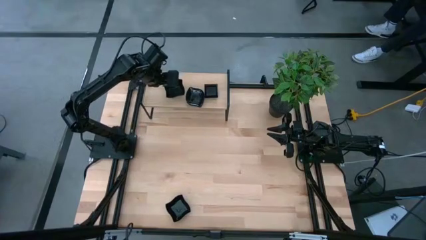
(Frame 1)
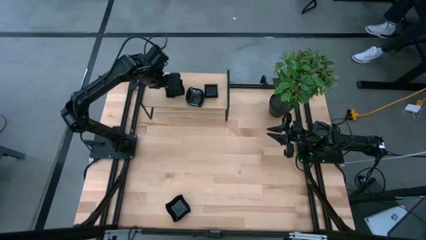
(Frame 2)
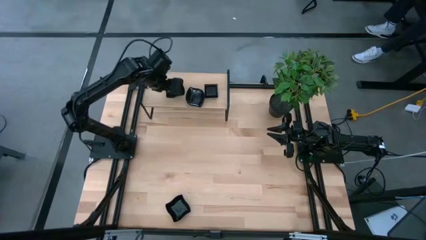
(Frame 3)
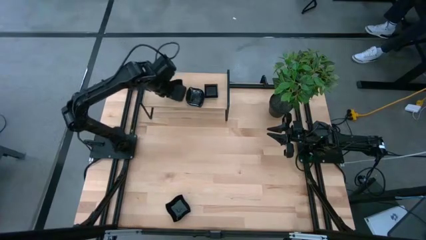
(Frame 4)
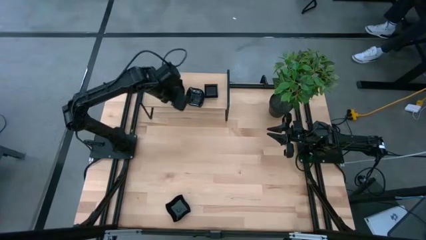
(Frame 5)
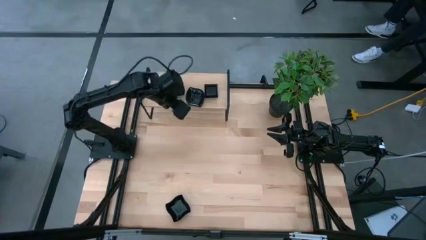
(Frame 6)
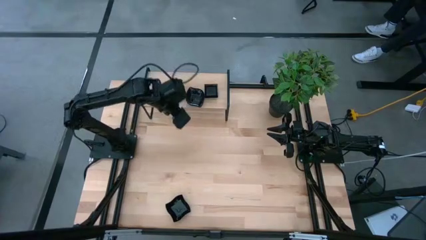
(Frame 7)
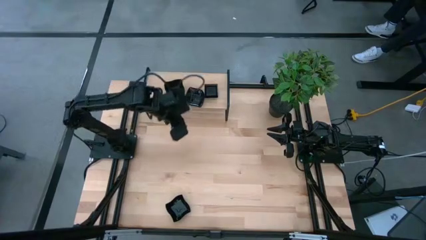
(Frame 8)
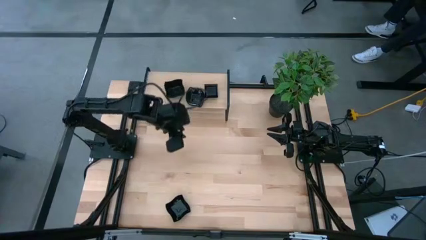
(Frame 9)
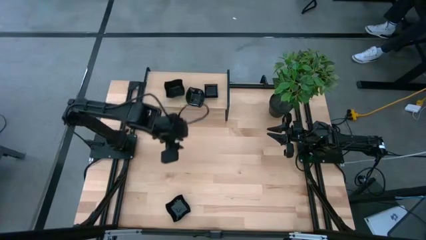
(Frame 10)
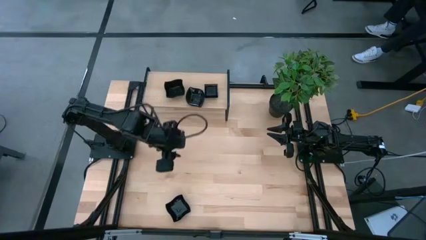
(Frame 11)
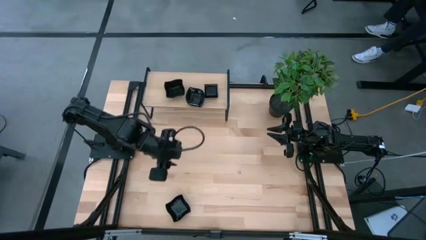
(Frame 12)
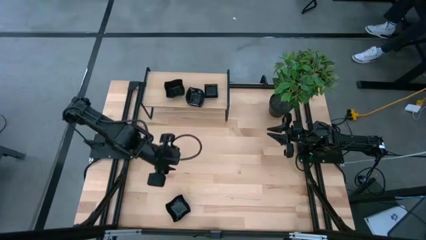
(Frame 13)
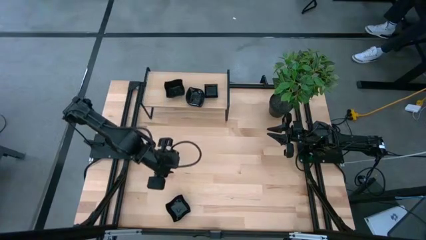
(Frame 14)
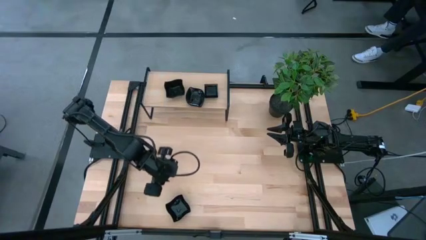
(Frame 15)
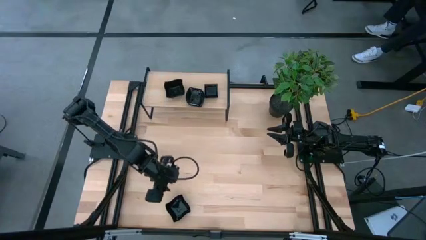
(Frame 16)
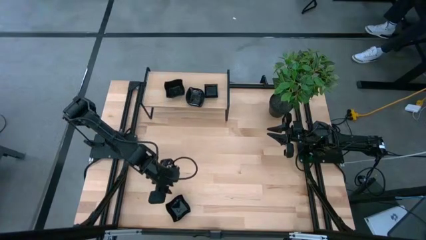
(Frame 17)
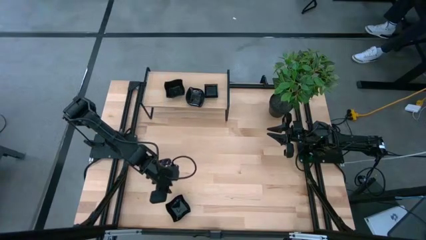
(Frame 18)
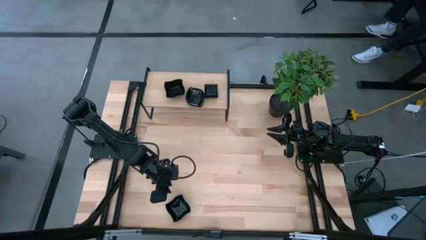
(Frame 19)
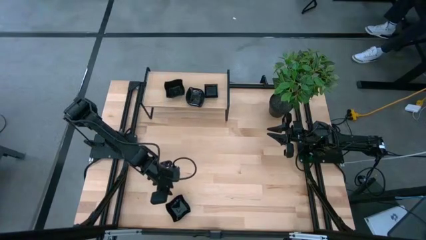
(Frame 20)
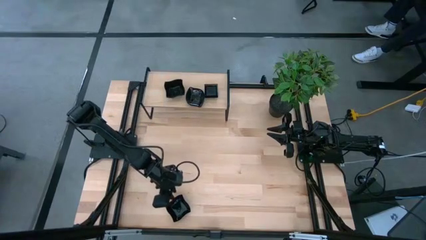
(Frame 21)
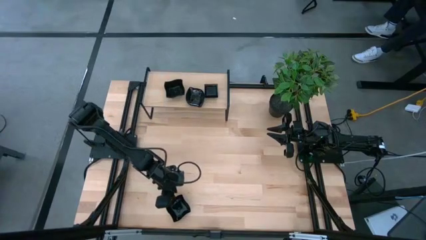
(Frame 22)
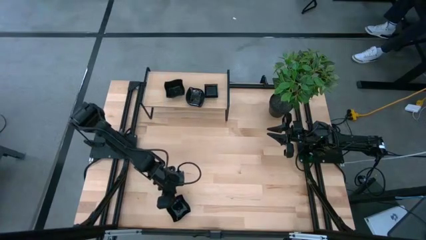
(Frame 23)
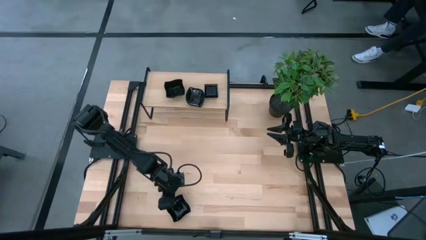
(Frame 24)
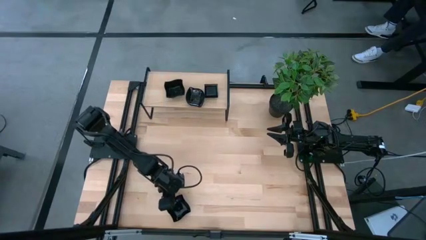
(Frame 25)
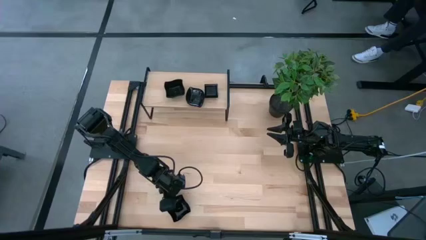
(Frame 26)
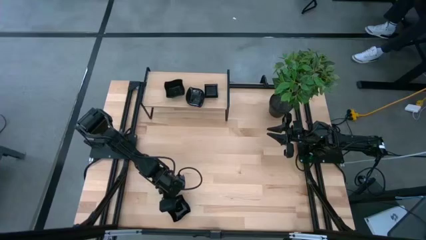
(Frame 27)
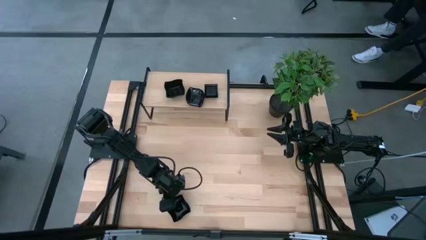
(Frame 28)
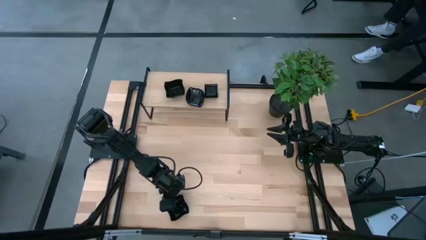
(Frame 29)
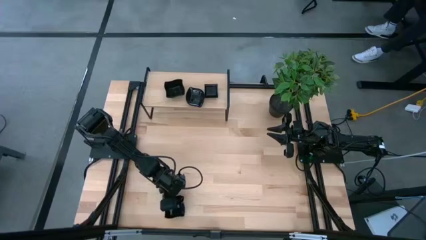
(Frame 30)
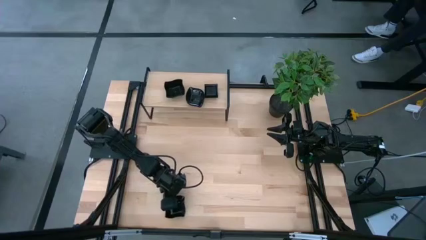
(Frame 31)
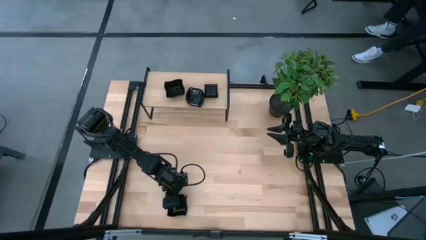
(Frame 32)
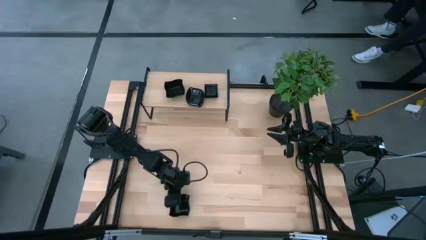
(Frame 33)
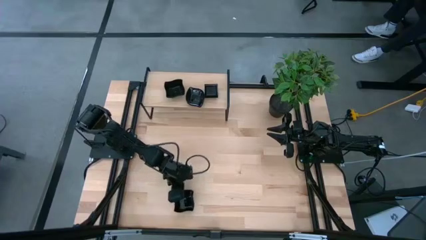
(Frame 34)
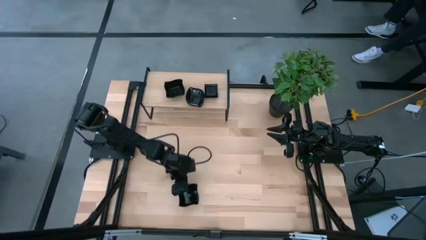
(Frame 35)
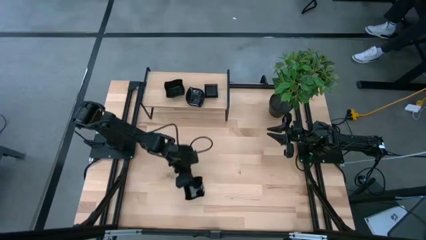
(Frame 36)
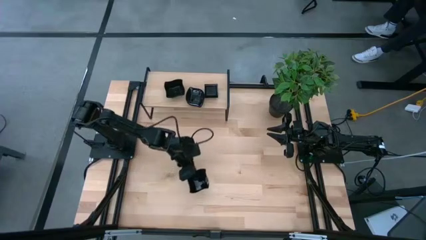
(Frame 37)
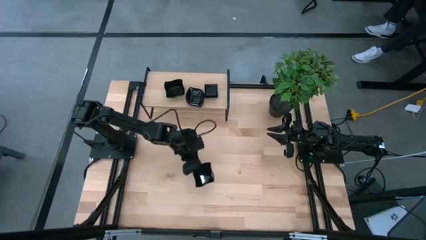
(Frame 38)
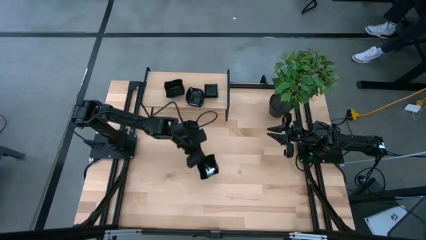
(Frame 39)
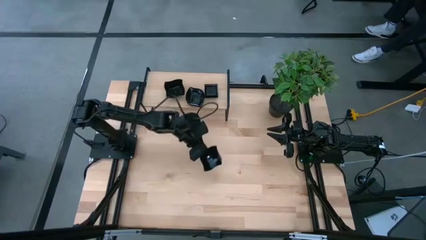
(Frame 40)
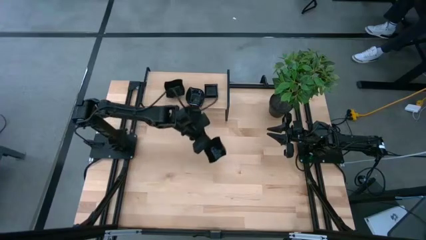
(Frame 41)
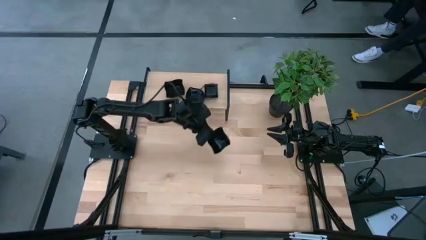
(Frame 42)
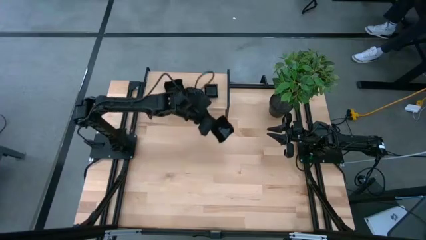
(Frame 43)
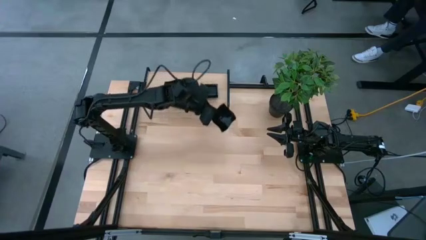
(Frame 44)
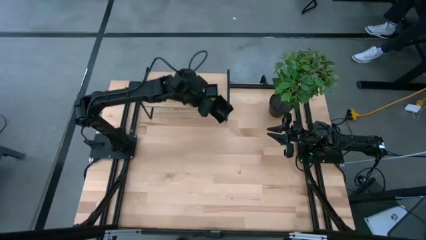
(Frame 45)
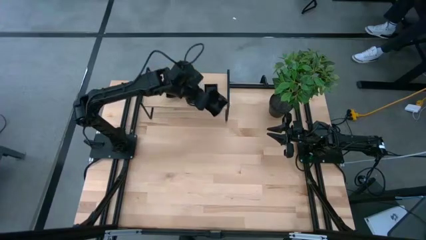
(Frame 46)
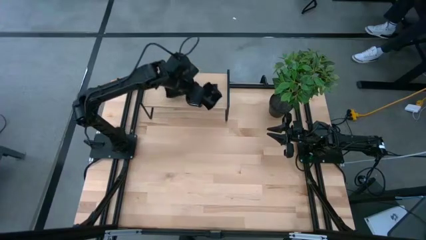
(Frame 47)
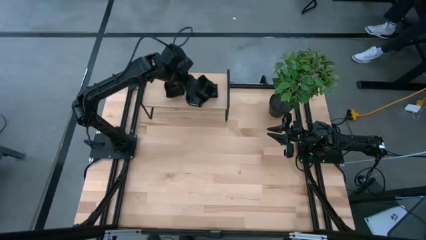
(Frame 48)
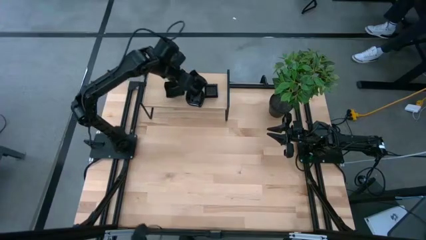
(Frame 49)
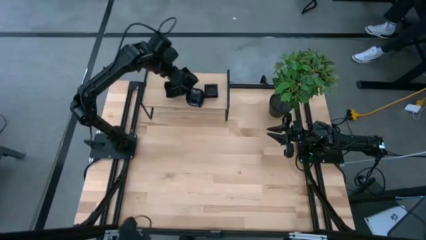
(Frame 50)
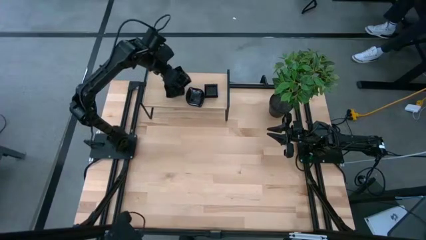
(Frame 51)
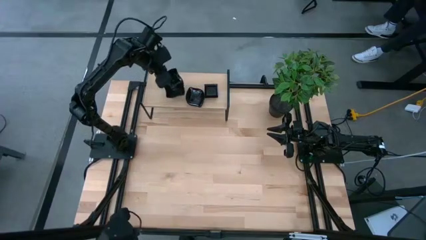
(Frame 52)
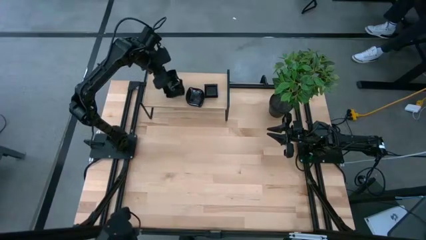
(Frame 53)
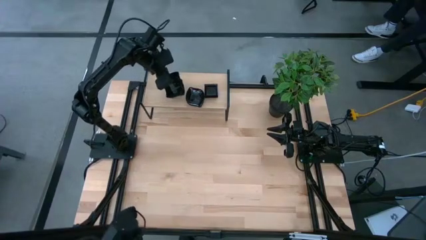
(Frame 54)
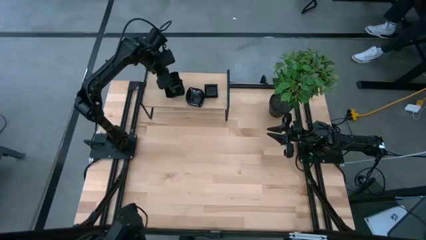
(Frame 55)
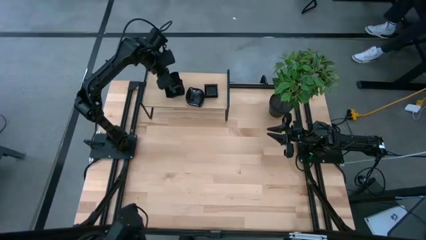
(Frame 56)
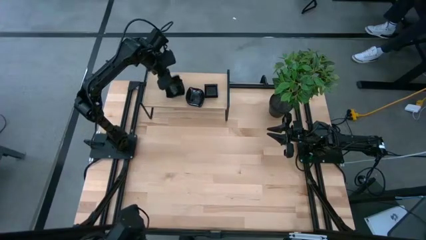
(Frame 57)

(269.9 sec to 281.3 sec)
Task: Pick & Place Mini shaped plates
Stack the distorted square plate on top of the distorted square plates on the shelf

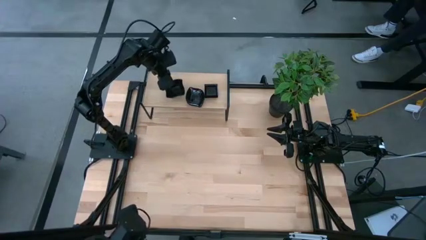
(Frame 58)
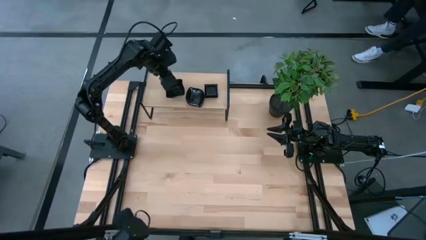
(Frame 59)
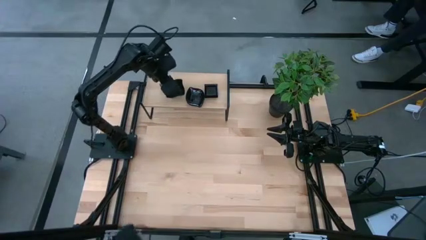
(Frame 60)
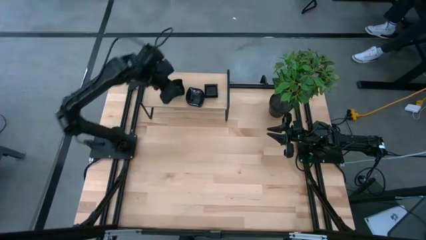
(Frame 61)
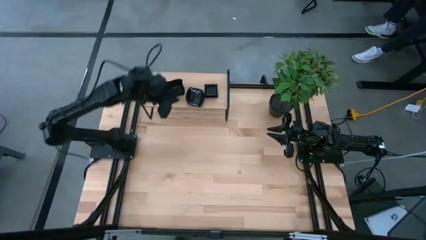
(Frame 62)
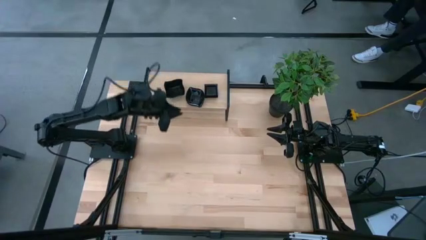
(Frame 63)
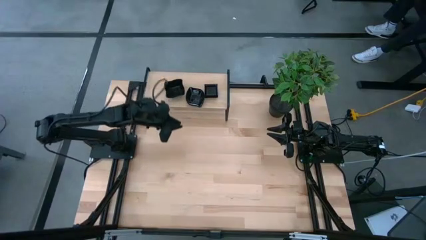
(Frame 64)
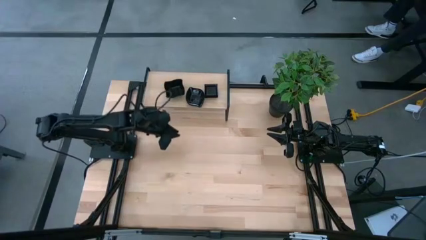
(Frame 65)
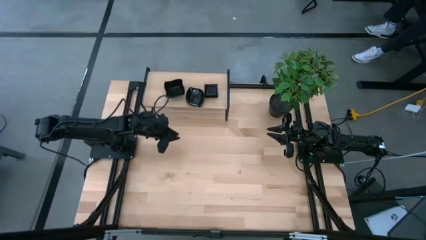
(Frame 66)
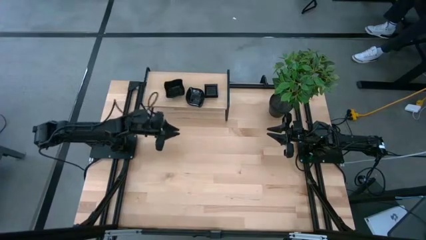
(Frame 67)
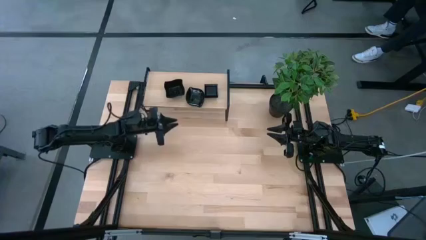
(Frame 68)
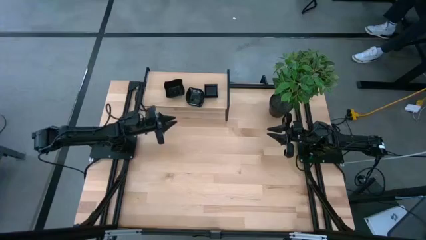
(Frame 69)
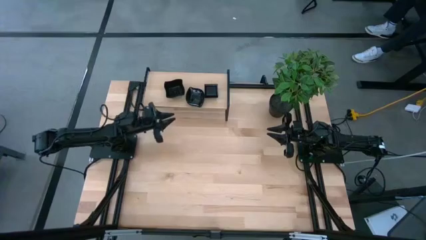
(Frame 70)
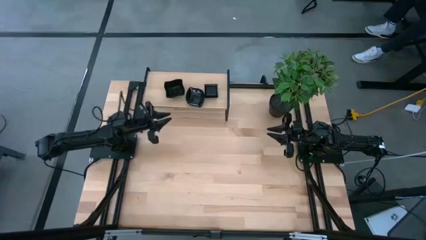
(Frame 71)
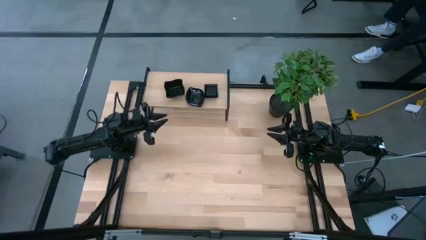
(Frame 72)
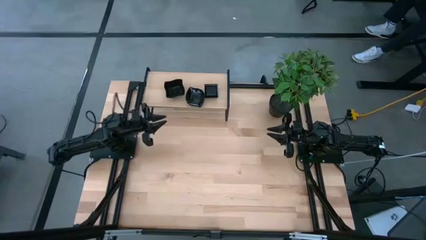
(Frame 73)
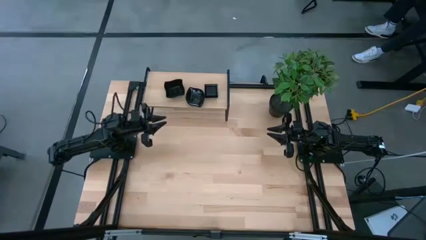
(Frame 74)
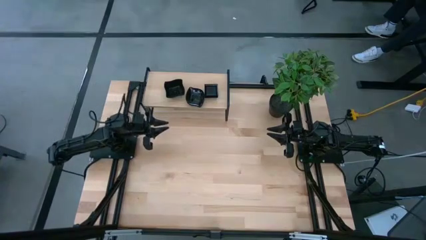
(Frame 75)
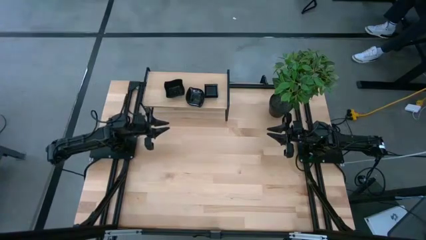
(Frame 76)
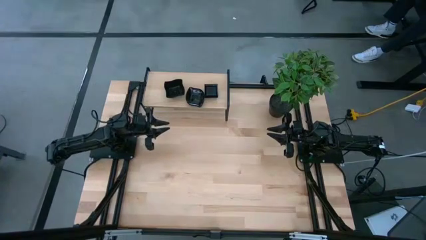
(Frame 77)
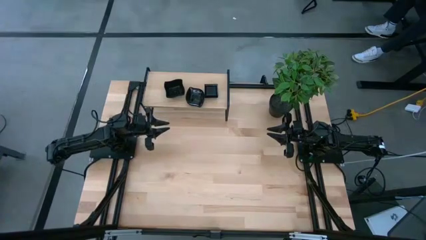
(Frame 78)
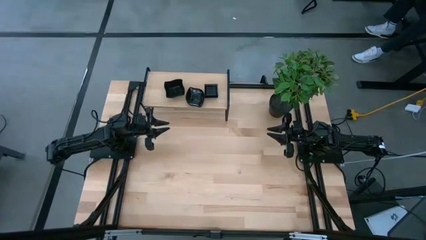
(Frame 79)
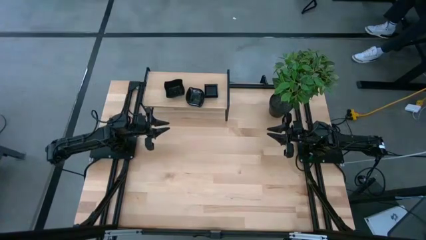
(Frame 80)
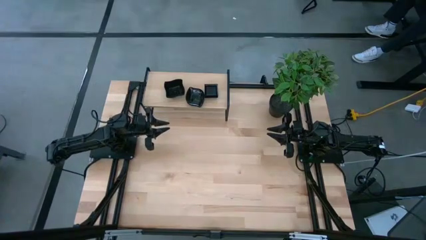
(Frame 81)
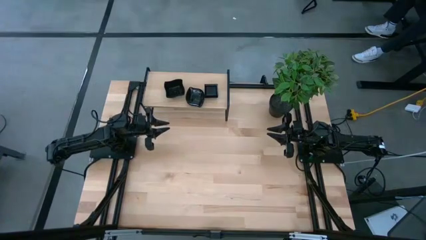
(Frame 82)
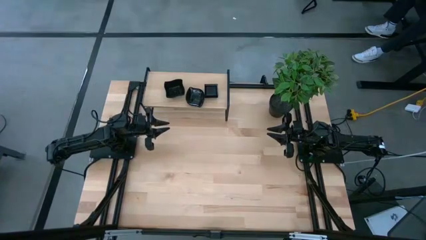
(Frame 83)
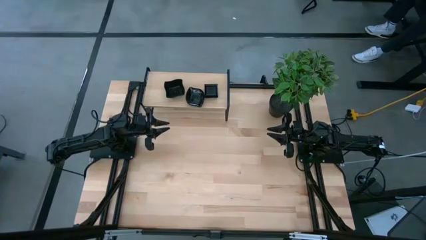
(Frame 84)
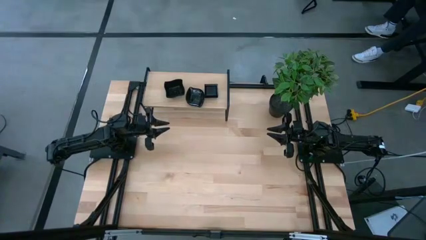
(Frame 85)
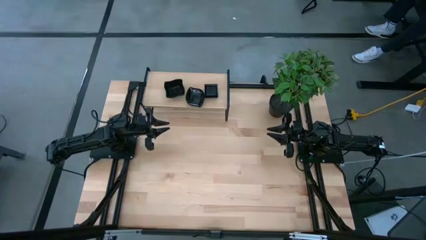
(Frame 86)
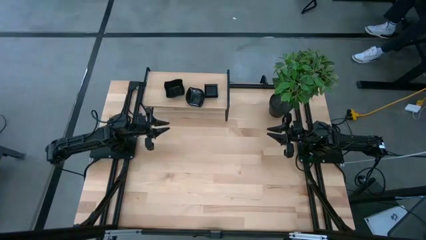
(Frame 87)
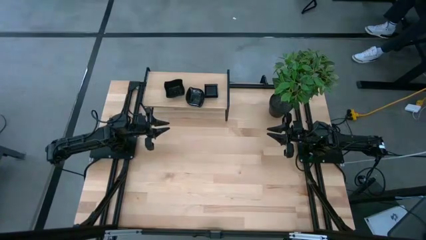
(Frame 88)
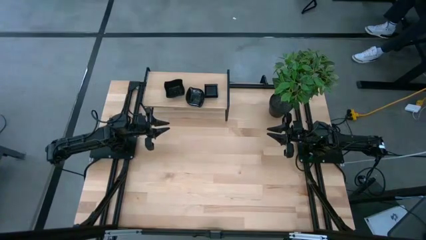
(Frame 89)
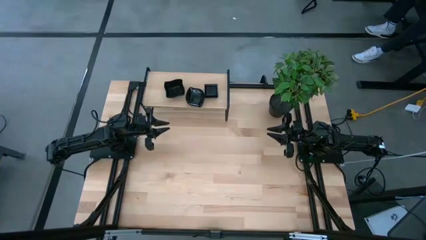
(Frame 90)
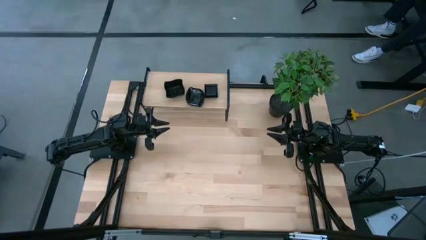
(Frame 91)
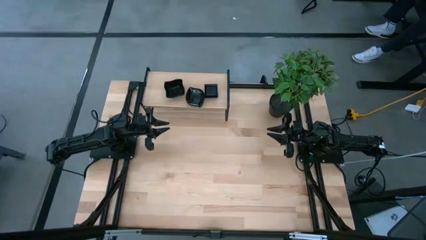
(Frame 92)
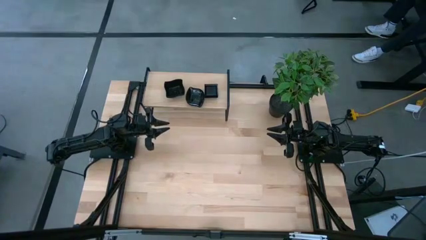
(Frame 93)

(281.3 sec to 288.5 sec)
Return to Home Position
